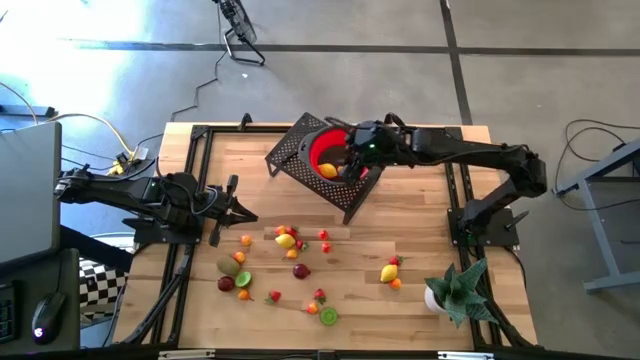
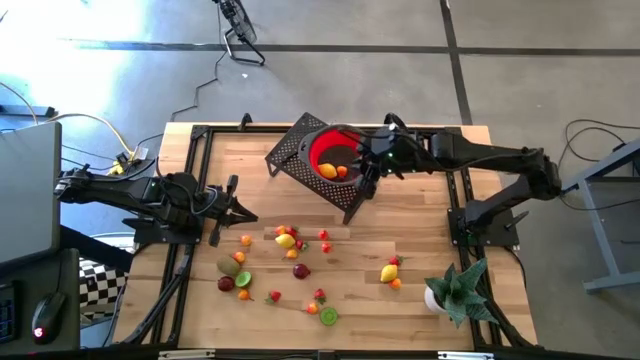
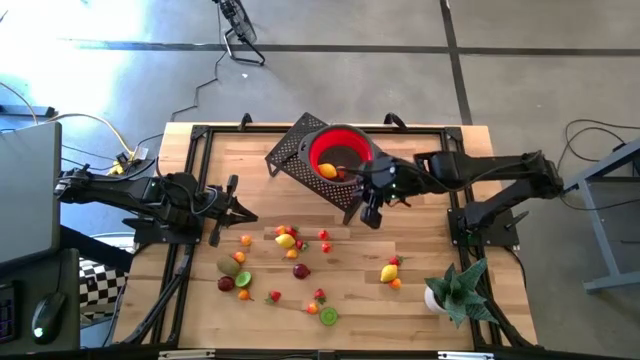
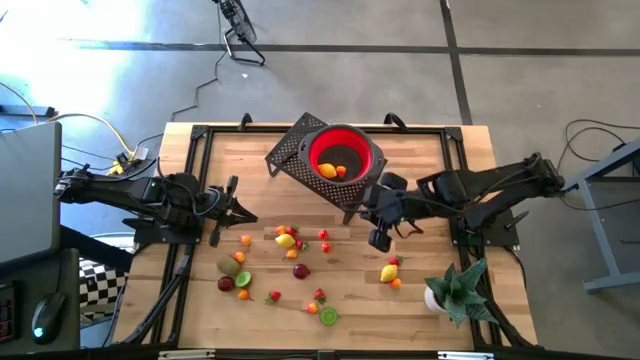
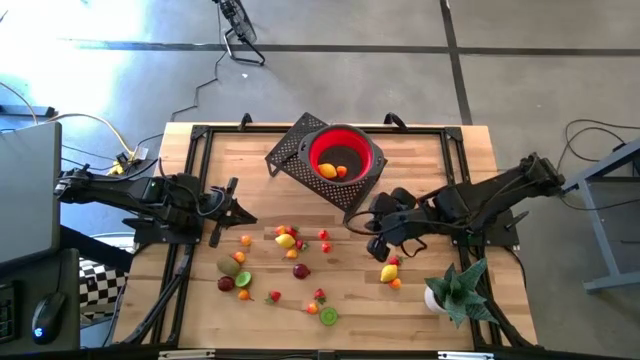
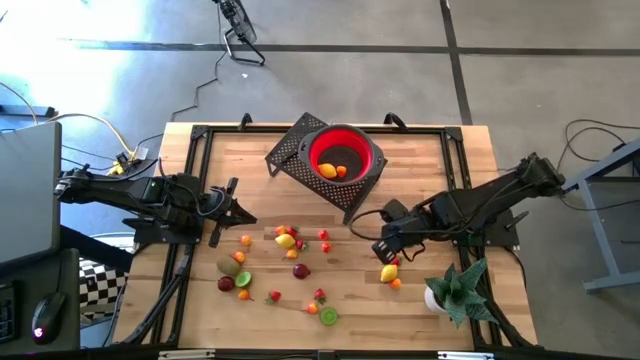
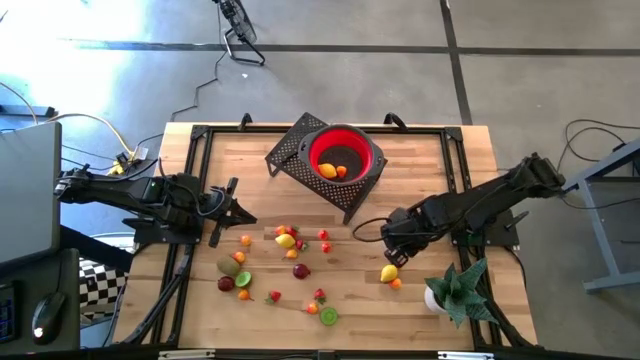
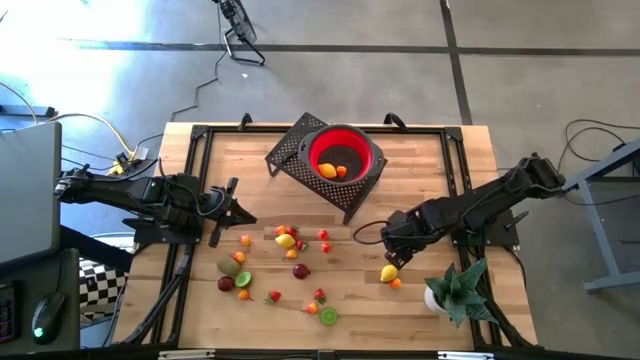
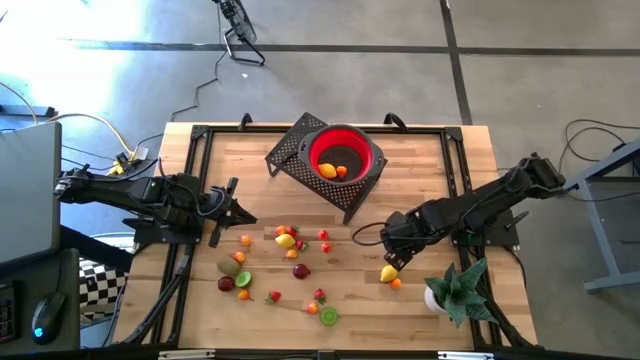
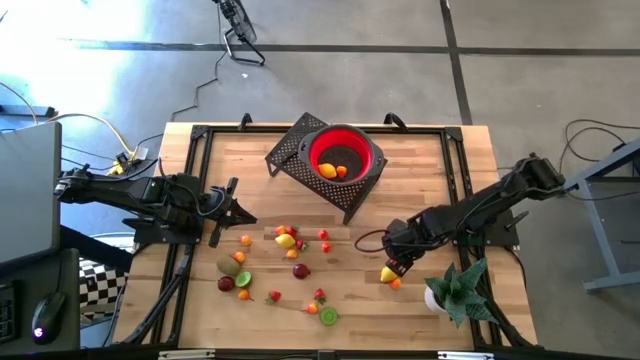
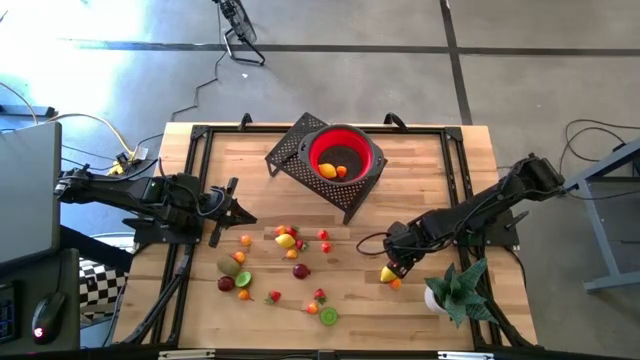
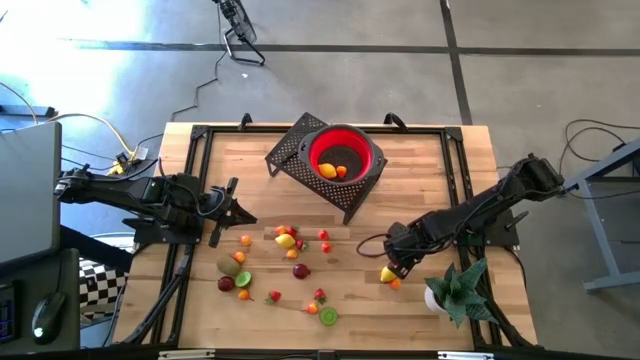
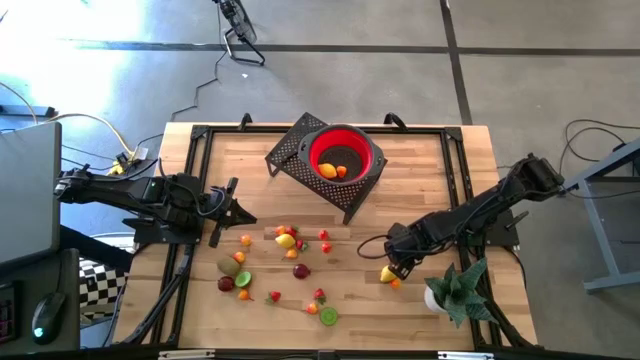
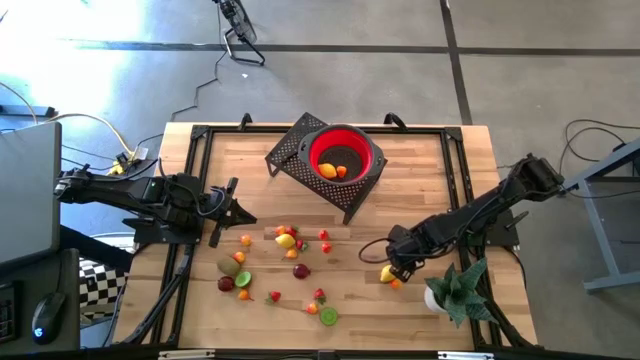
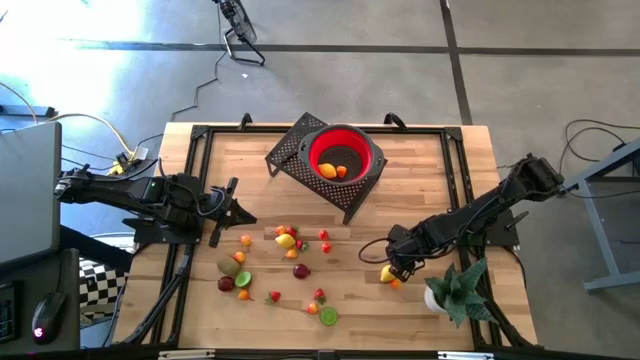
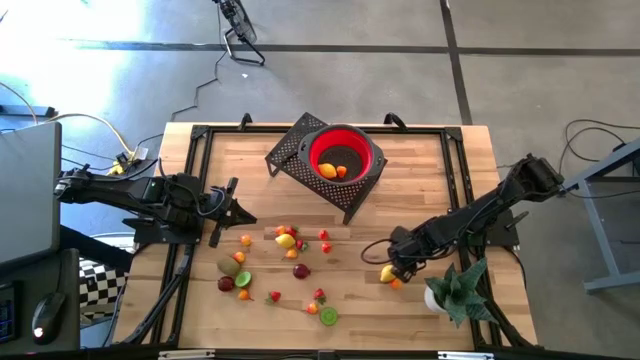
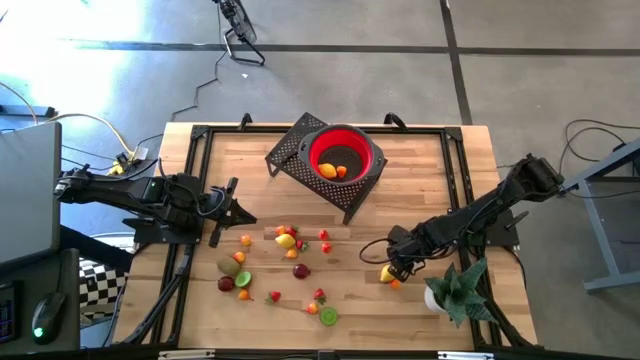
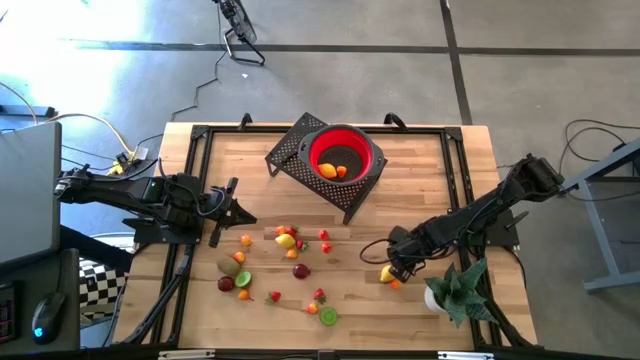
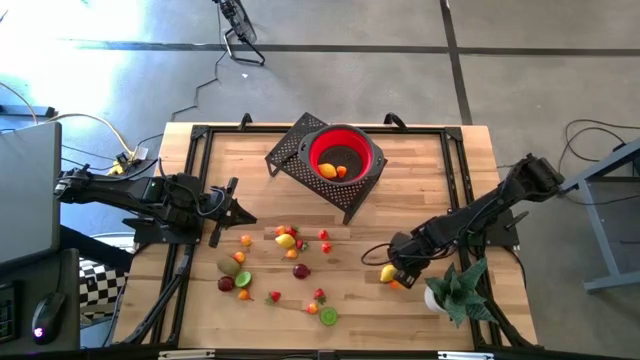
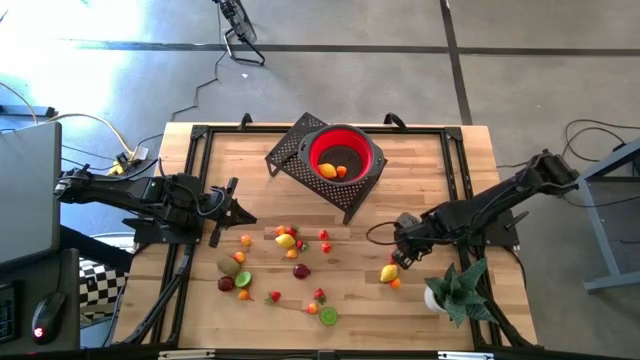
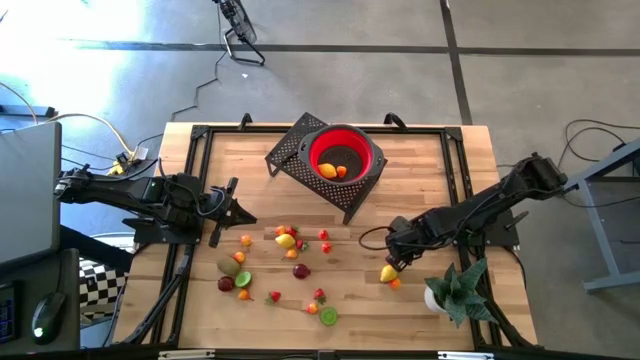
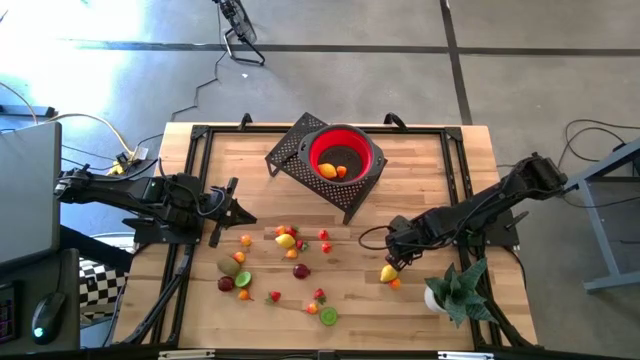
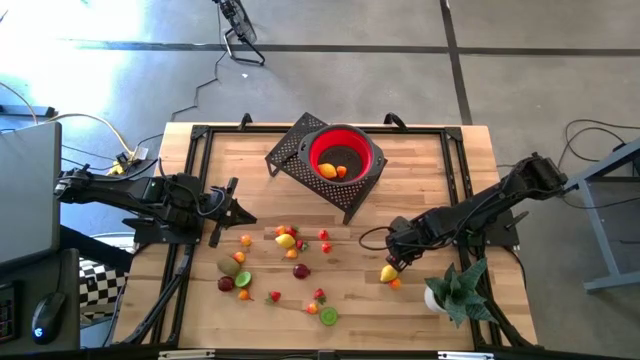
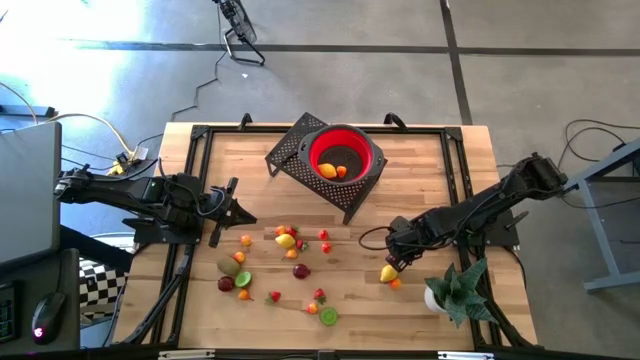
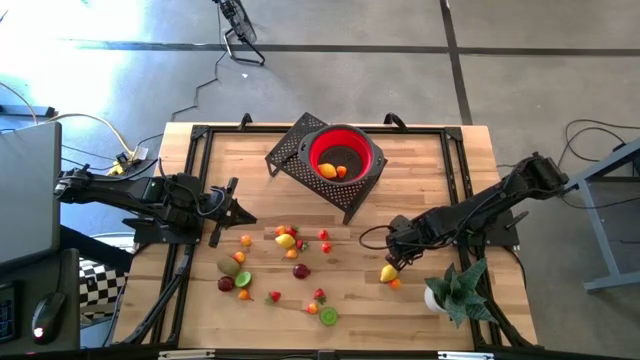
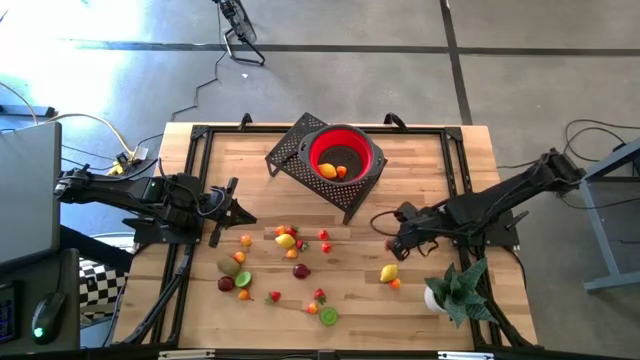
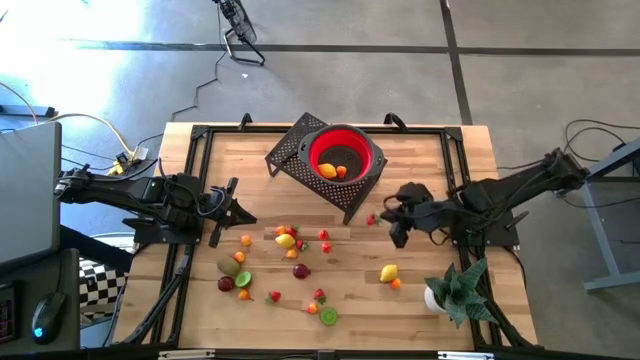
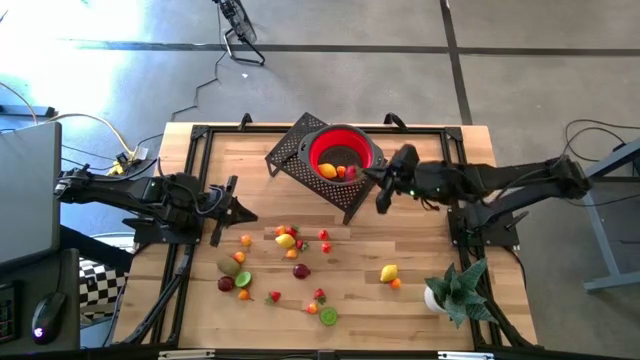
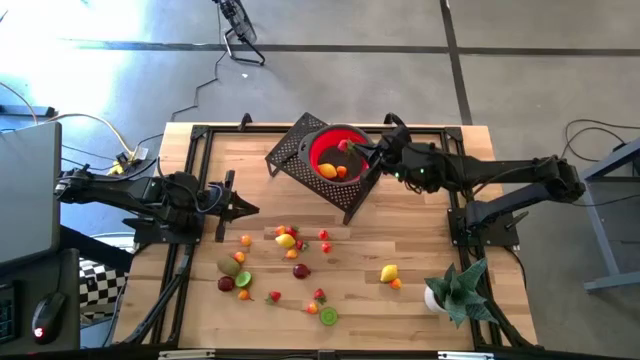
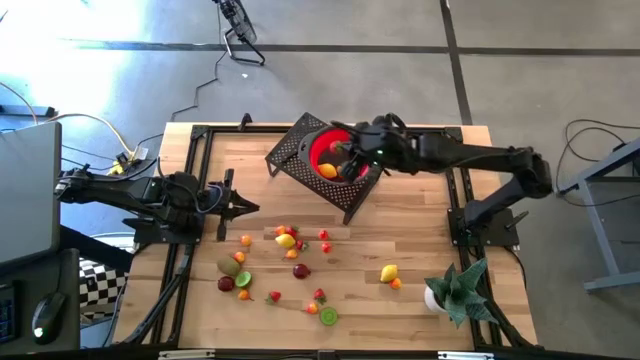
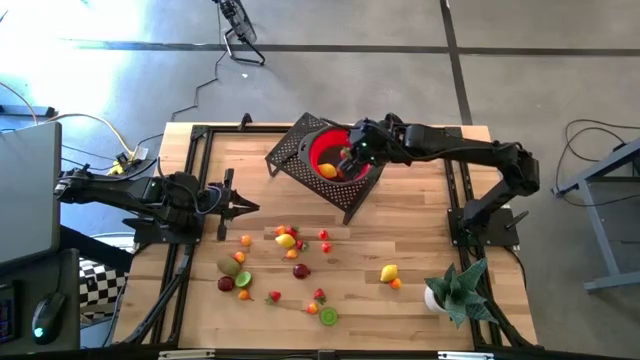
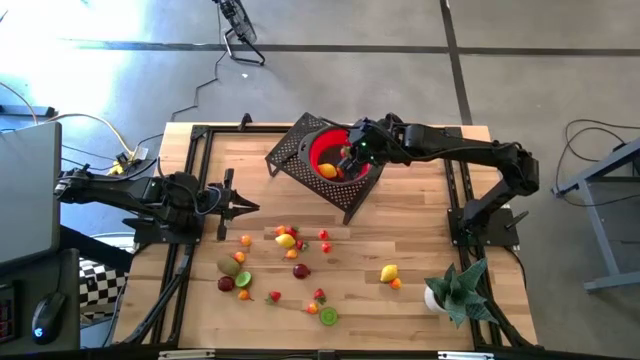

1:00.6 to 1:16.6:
Task: Pick & Place Fruit
Put the strawberry into the strainer bowl on the shelf

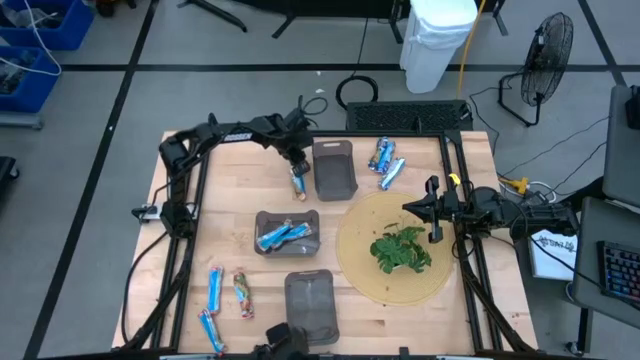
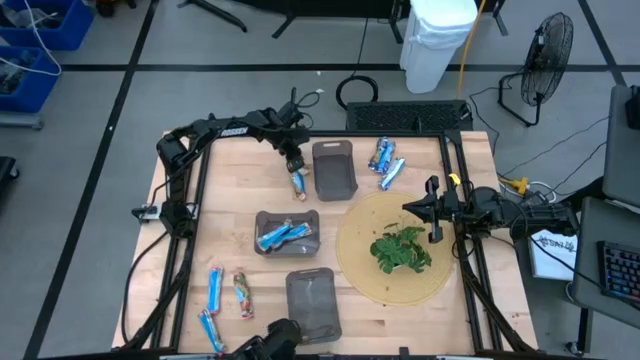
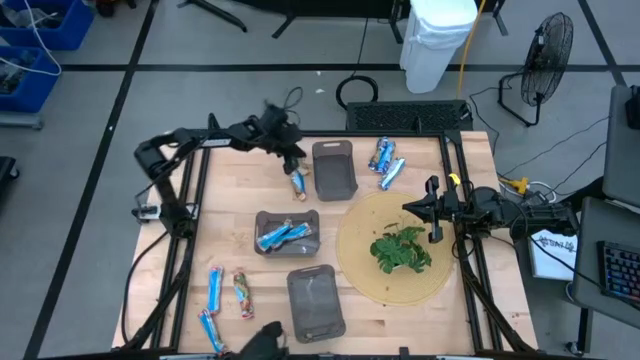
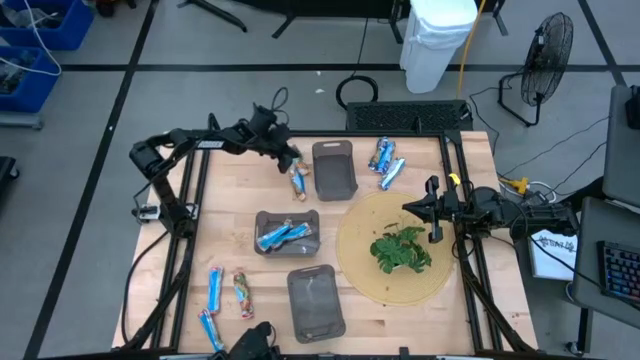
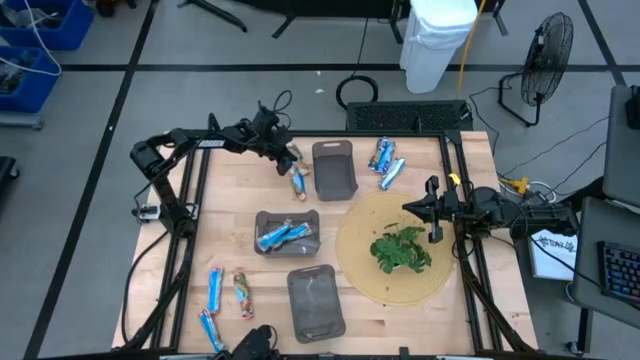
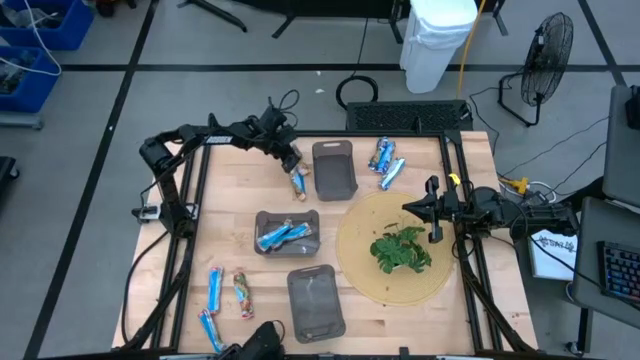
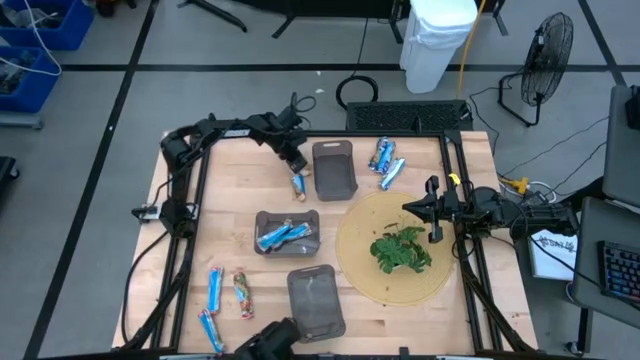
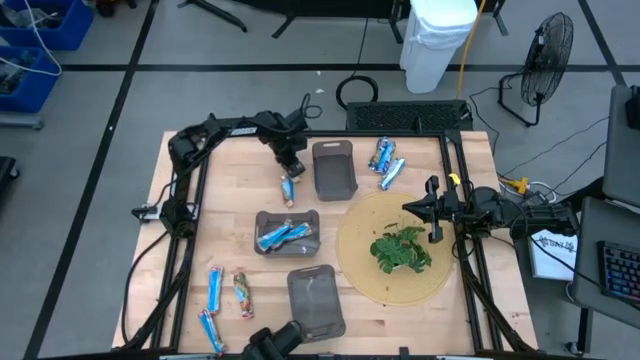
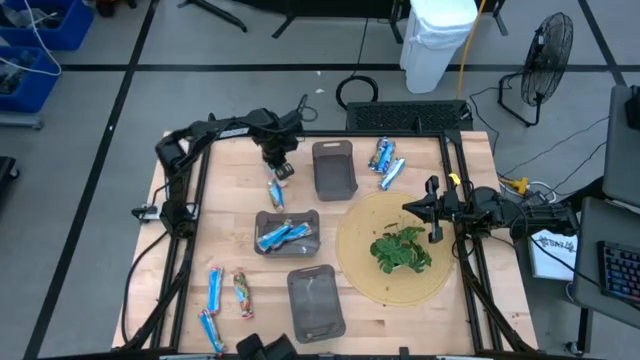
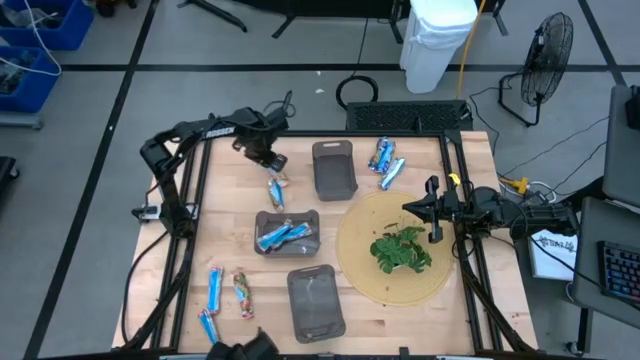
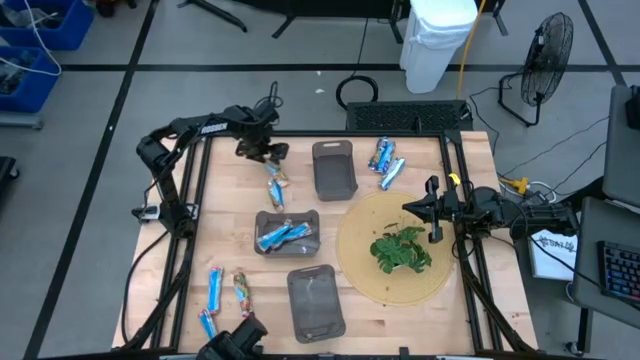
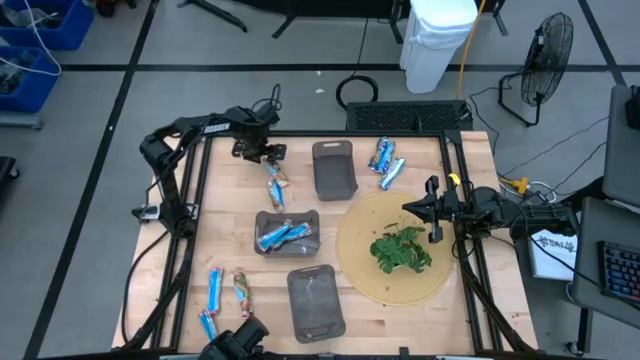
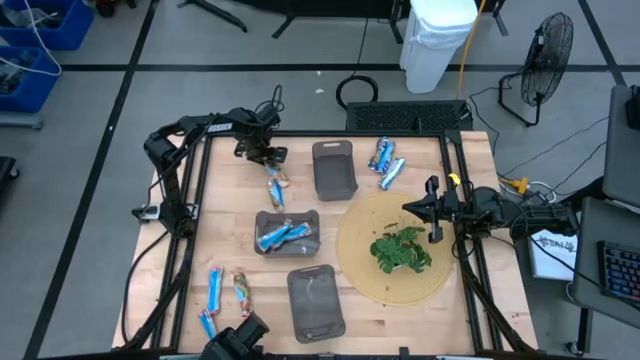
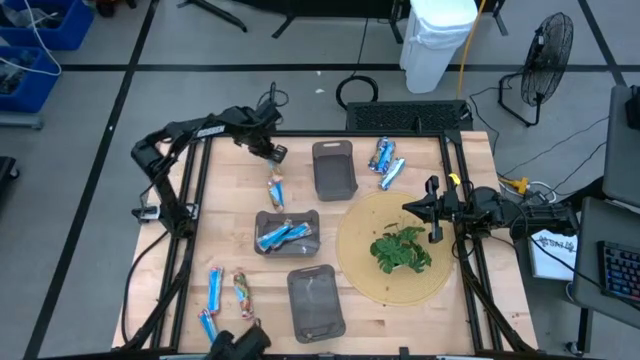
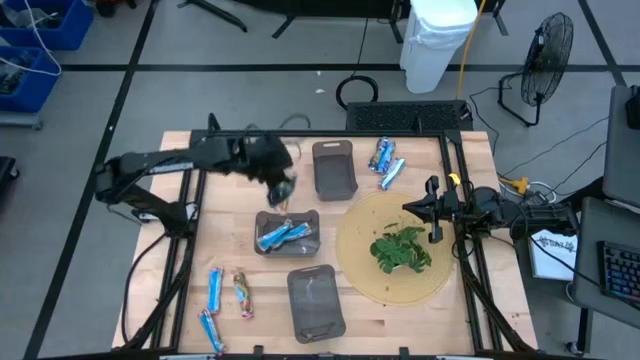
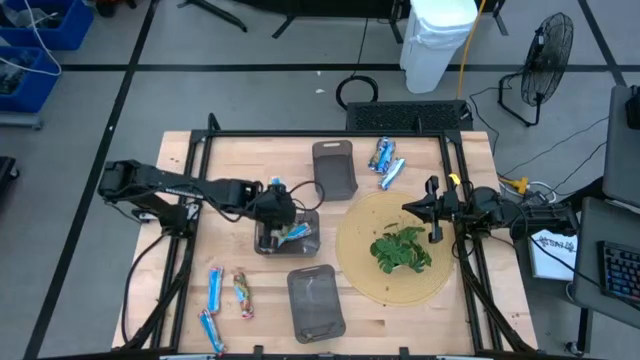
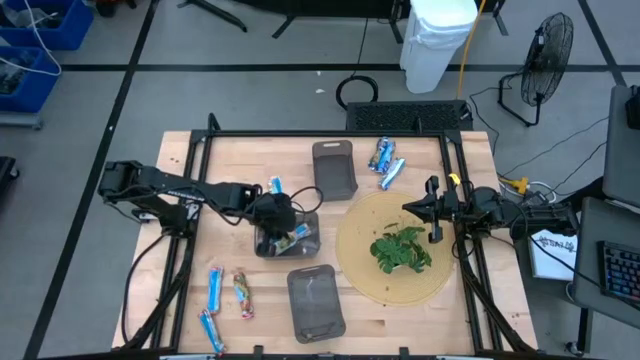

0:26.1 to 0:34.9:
Task: Pick and place Granola Bars by type
Put the yellow granola bar into the middle black bin
